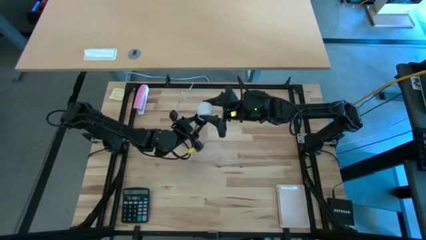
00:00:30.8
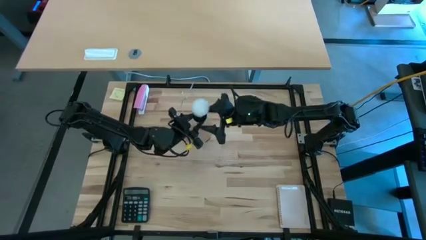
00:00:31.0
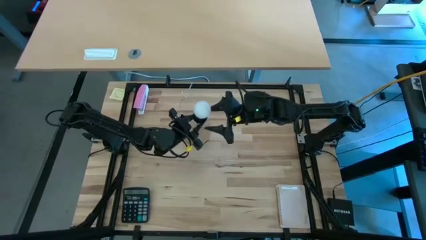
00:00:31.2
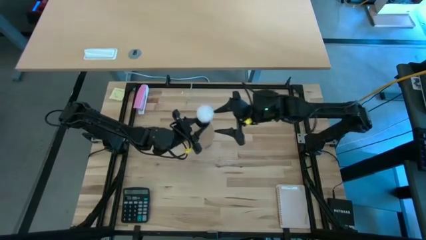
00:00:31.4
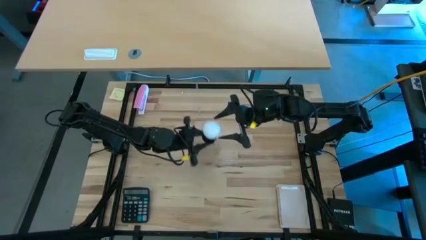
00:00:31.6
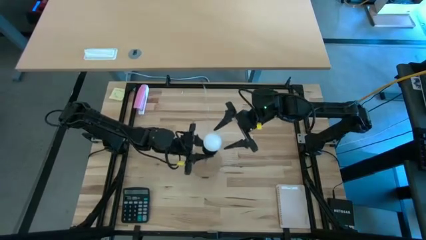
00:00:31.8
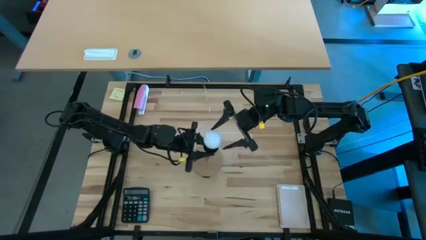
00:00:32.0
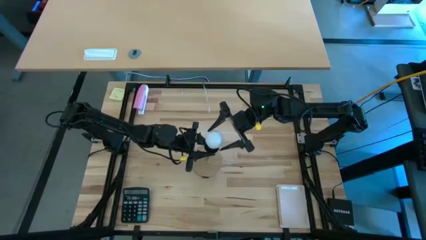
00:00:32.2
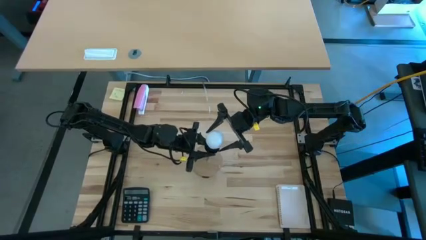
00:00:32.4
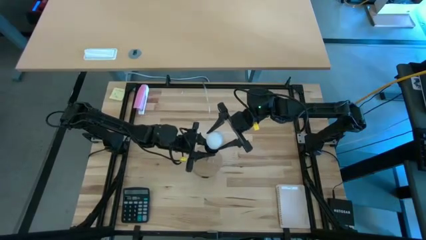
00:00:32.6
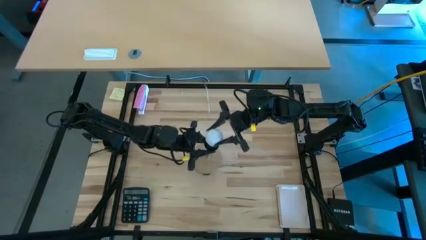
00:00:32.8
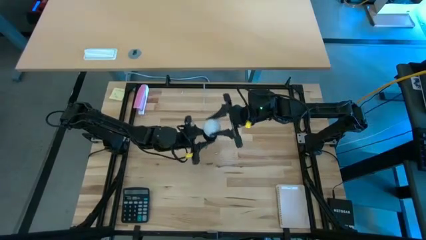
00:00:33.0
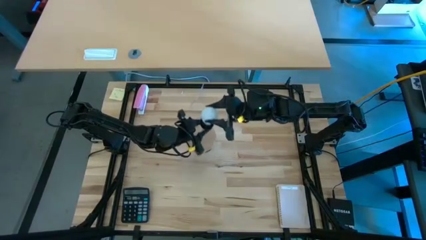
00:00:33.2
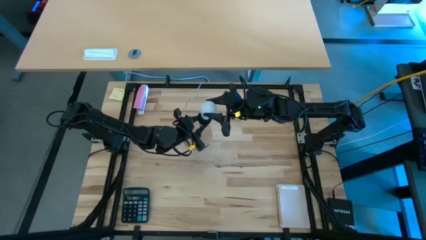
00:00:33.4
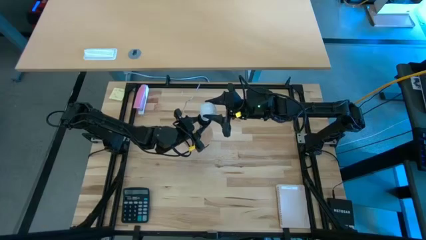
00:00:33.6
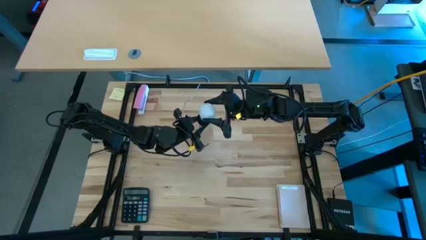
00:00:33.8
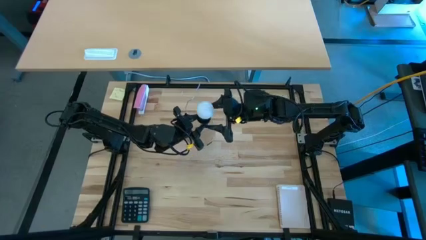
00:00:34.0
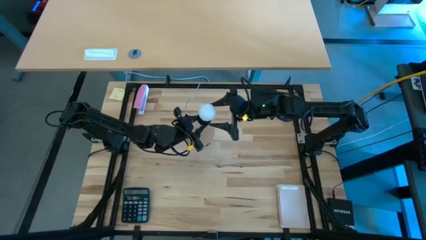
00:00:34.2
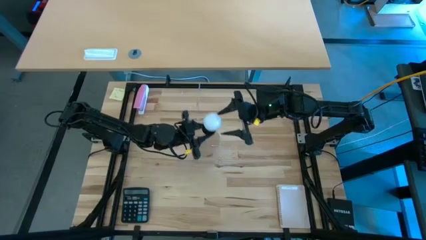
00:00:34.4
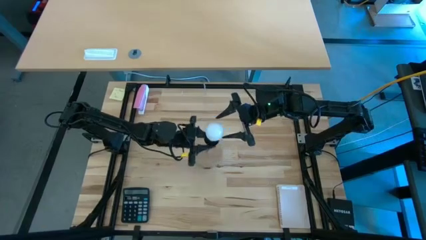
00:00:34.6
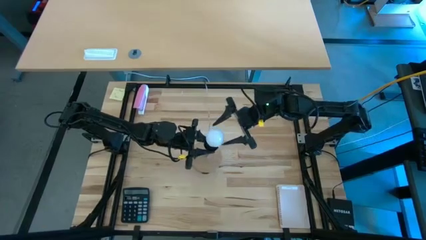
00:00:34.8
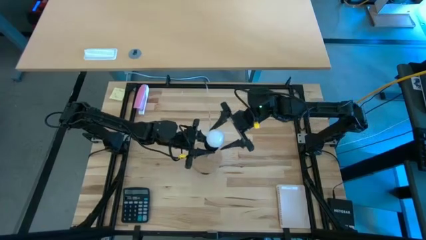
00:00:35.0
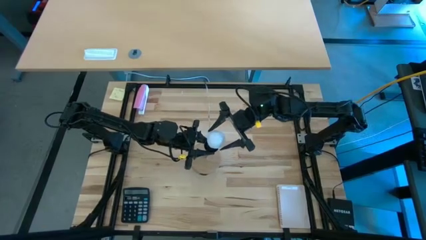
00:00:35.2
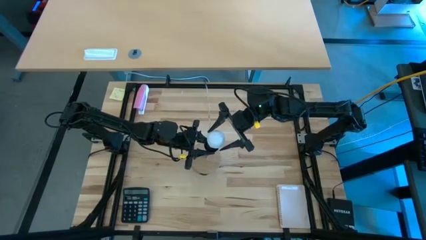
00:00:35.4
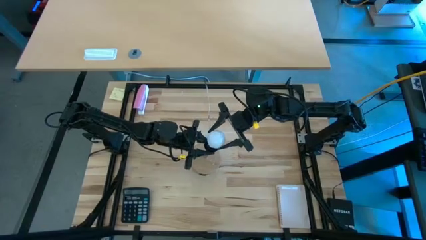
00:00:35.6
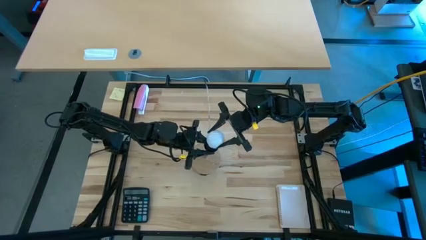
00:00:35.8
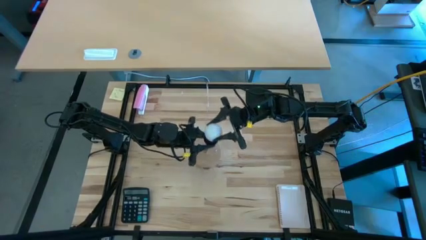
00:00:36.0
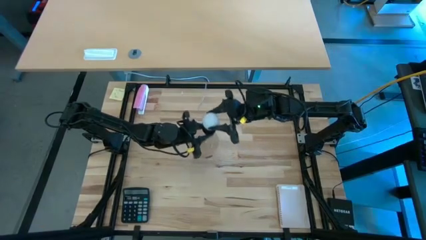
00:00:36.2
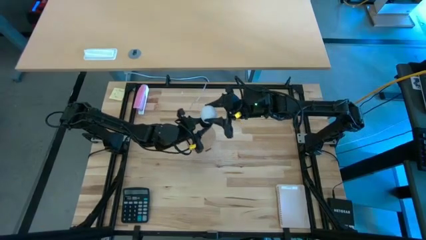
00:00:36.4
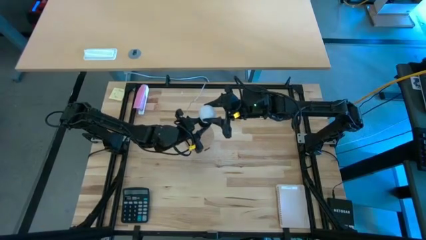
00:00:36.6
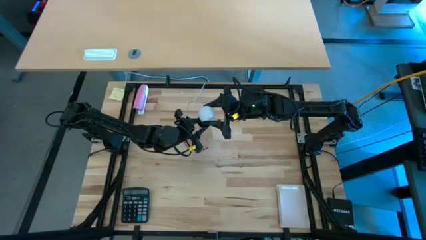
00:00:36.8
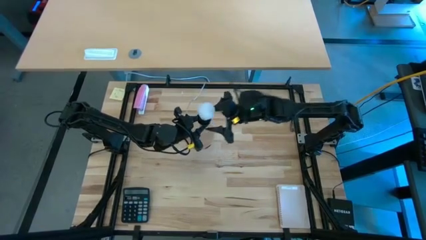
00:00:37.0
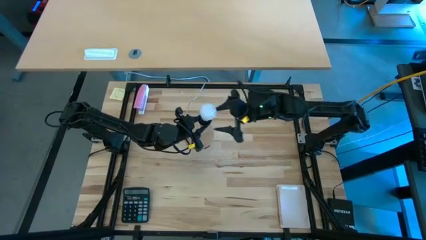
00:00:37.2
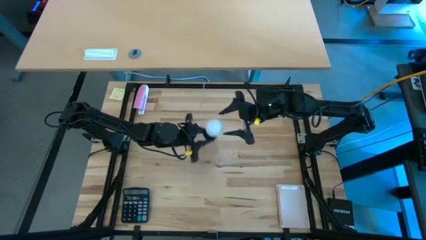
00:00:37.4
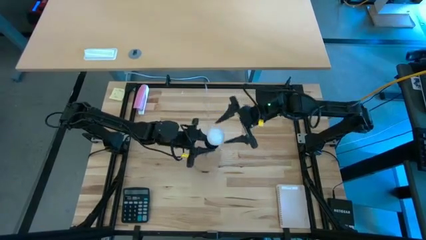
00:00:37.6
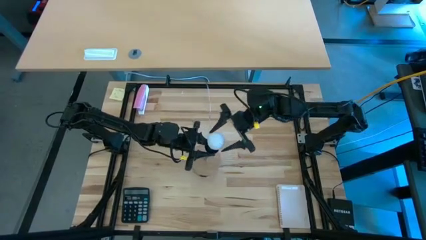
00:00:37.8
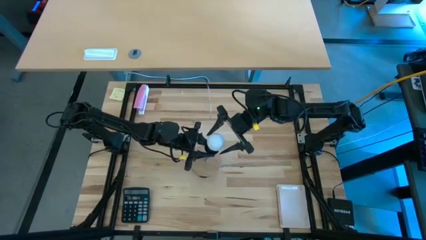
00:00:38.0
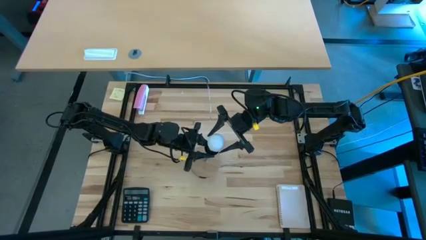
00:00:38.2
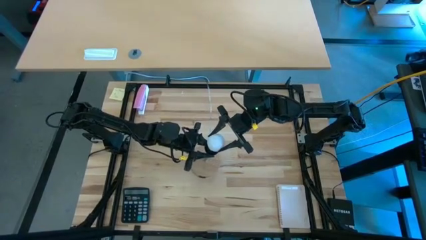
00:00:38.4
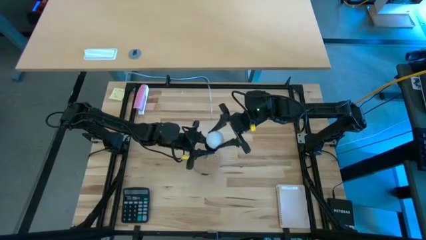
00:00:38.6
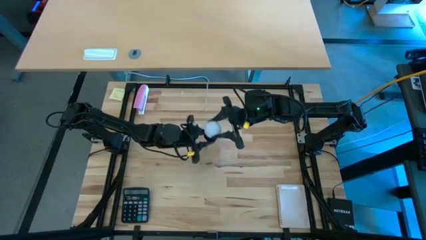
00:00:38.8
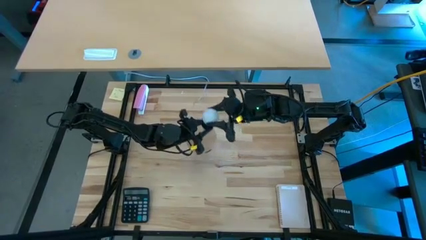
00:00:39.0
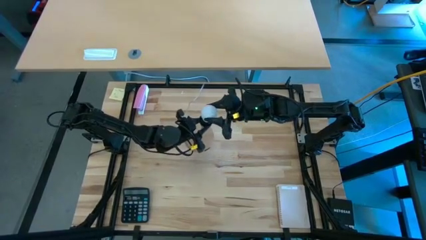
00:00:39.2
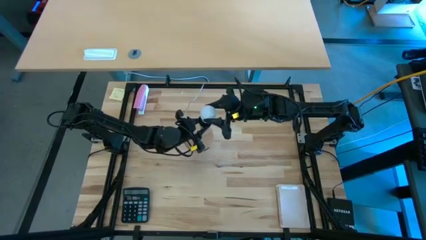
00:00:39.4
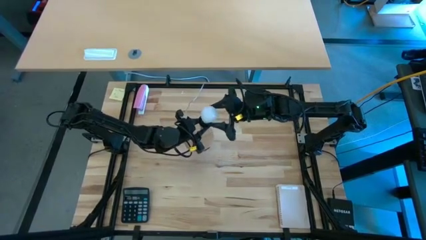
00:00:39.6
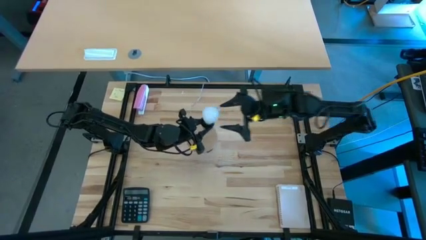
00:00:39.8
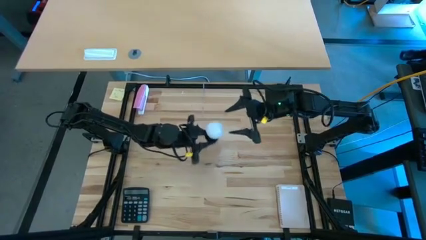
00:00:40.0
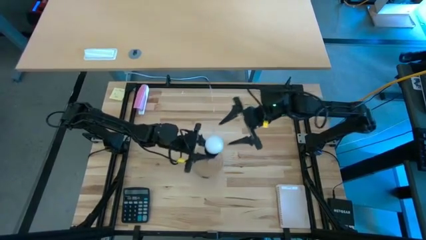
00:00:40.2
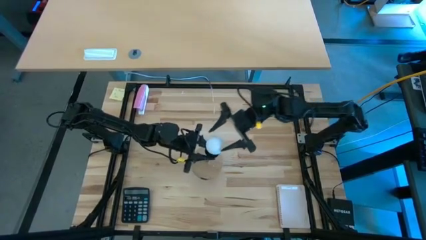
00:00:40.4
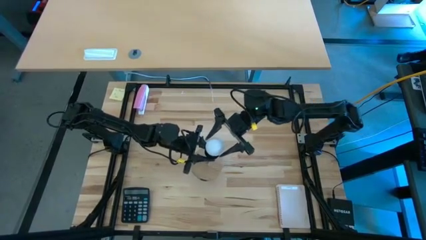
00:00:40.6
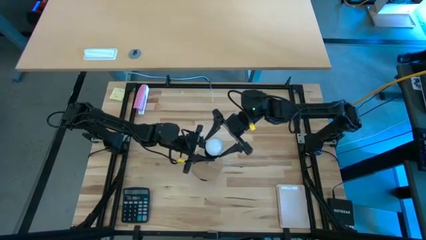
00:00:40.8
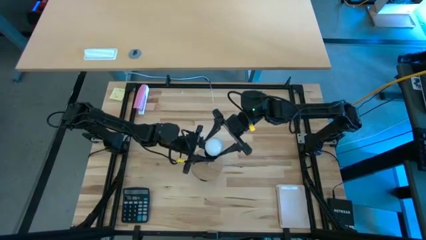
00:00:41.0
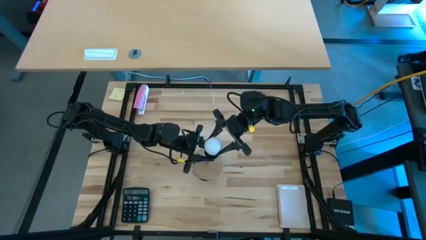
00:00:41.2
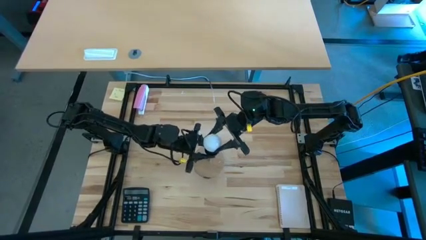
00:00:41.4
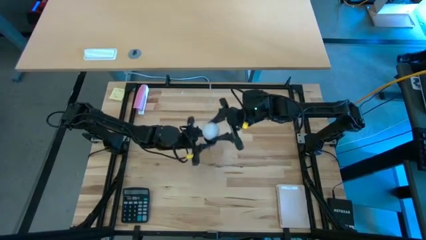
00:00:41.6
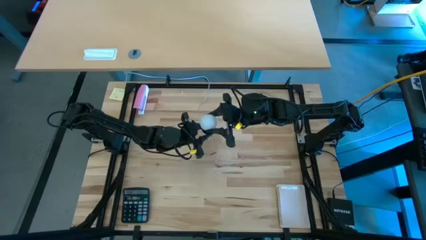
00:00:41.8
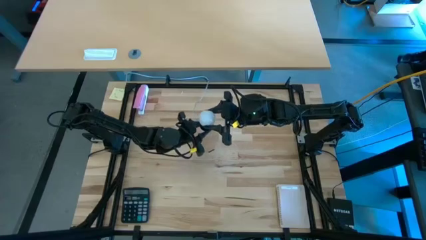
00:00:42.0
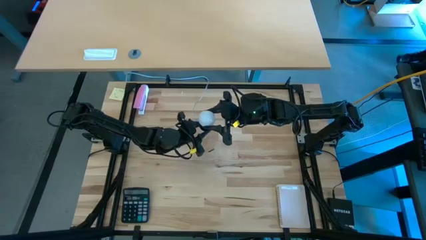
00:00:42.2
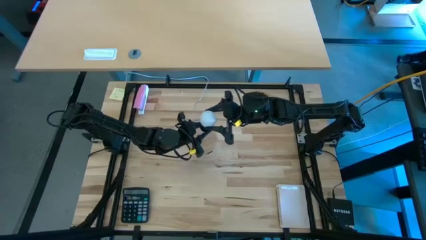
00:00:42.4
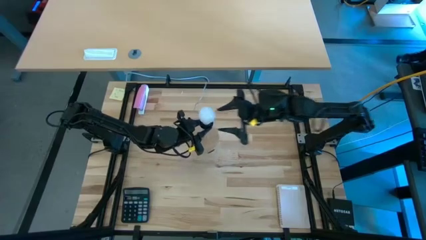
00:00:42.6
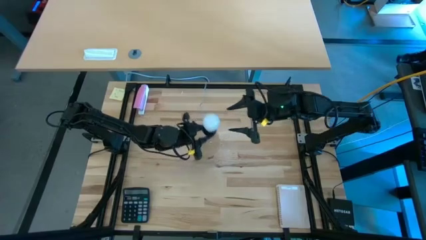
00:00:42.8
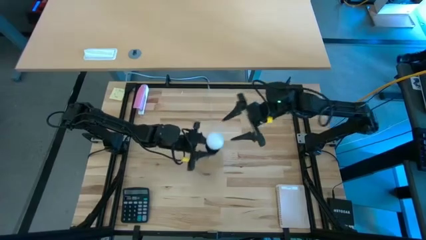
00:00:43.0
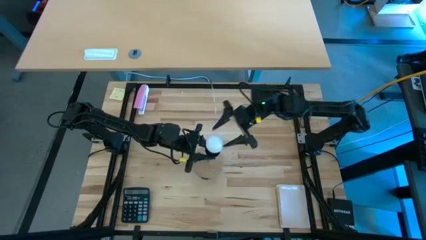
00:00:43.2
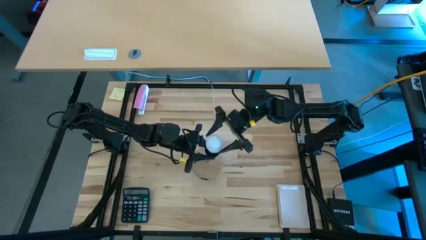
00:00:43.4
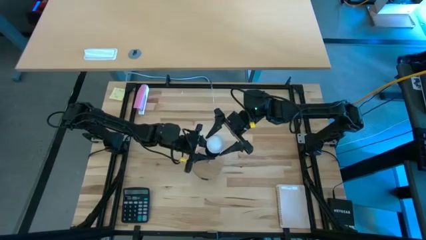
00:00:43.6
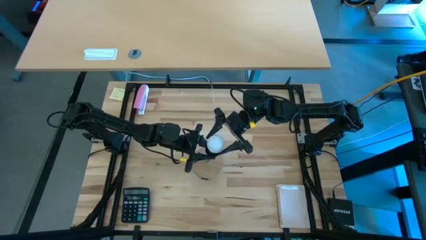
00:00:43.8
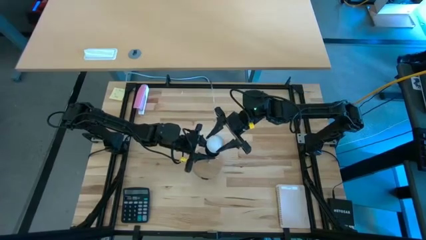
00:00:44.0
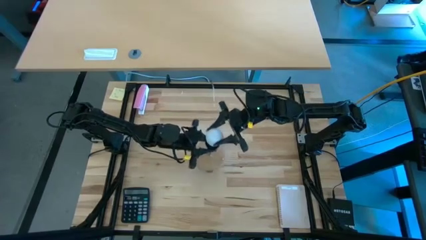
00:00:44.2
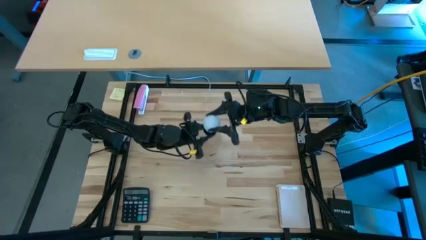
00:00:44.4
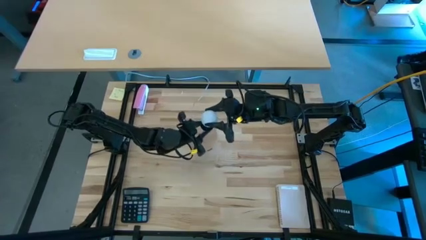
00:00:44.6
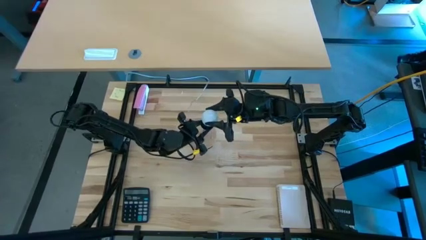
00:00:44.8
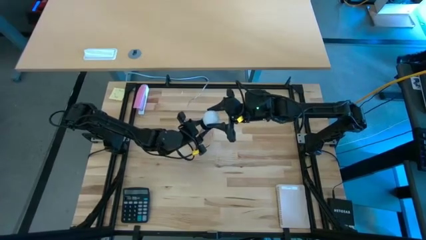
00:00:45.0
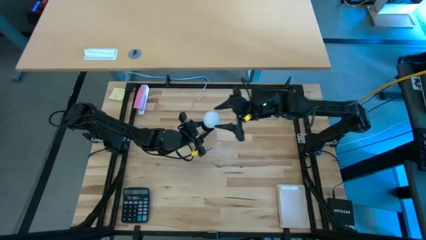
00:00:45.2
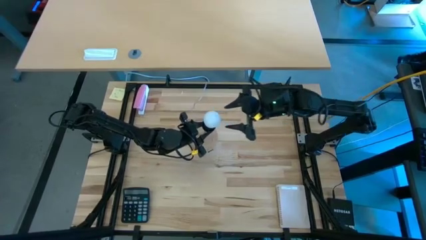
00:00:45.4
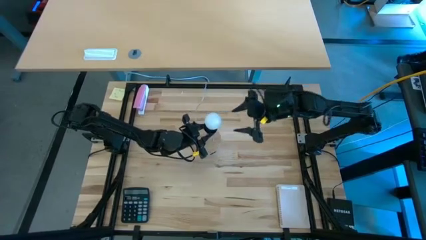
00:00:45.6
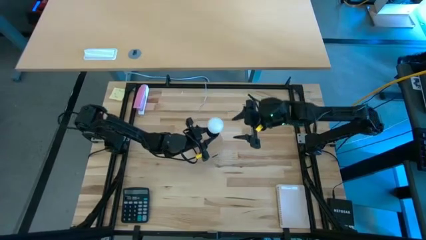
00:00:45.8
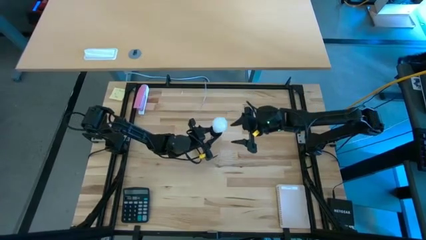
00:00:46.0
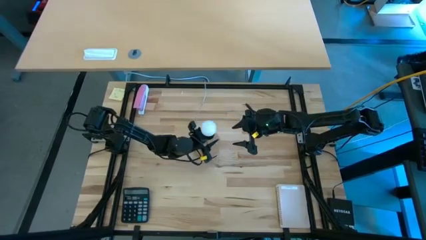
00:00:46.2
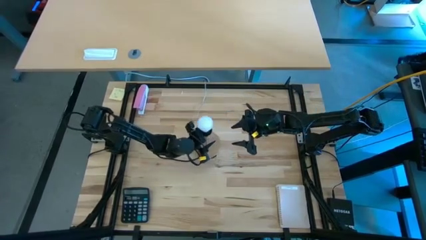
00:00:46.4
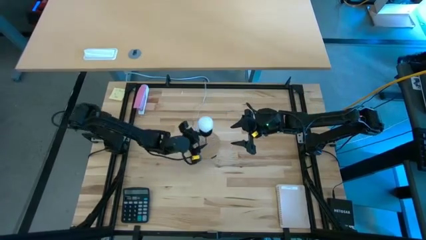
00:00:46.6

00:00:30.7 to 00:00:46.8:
Task: Screw lightbulb
Insert the lightbulb into the lamp
